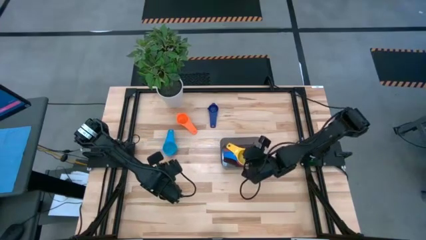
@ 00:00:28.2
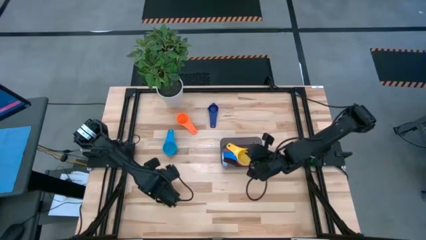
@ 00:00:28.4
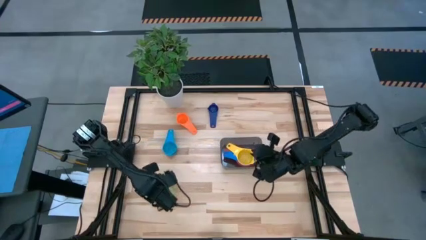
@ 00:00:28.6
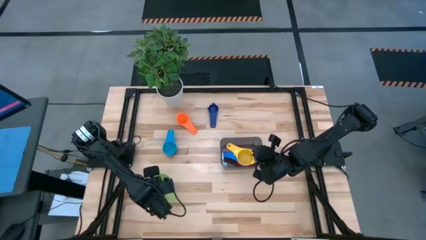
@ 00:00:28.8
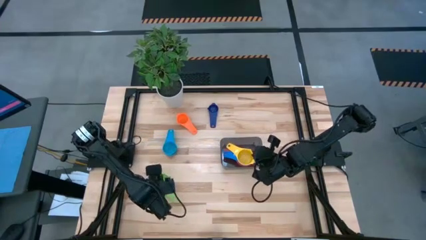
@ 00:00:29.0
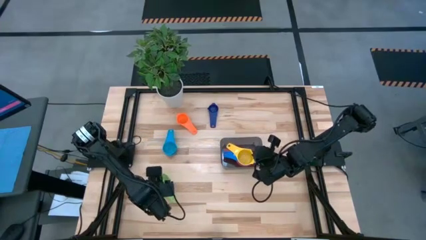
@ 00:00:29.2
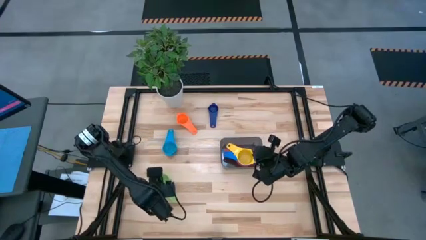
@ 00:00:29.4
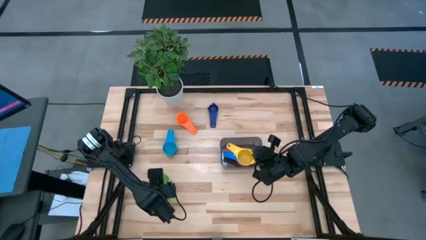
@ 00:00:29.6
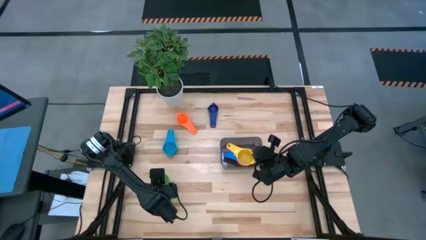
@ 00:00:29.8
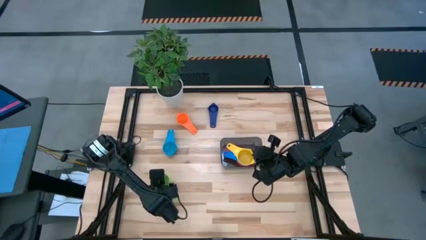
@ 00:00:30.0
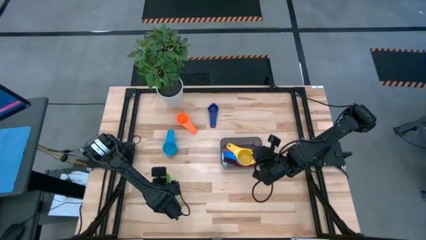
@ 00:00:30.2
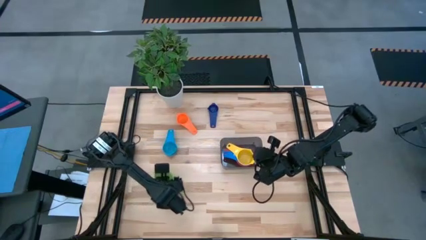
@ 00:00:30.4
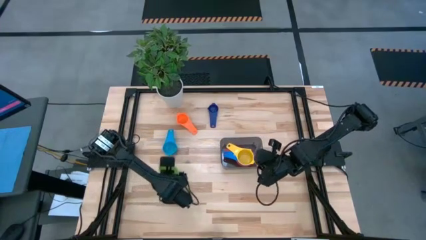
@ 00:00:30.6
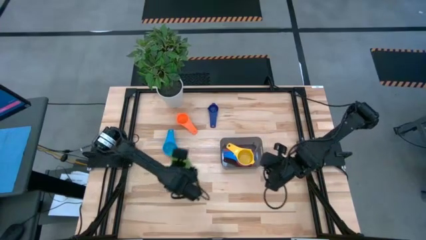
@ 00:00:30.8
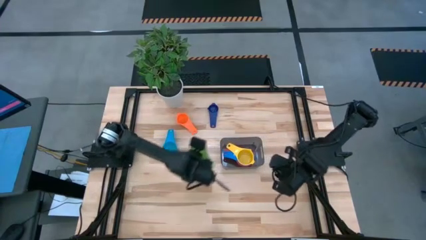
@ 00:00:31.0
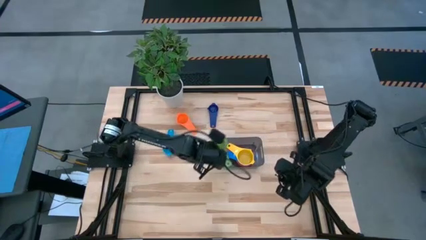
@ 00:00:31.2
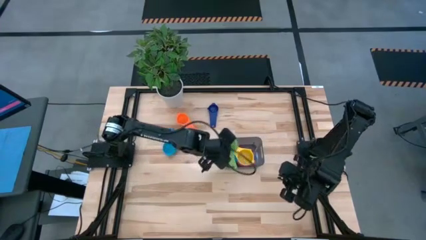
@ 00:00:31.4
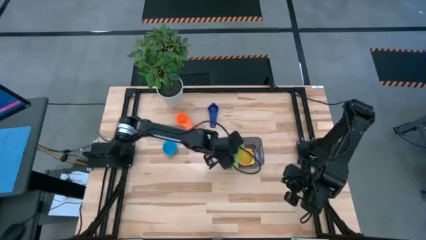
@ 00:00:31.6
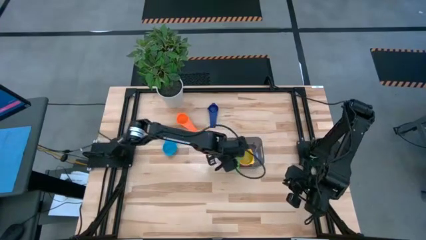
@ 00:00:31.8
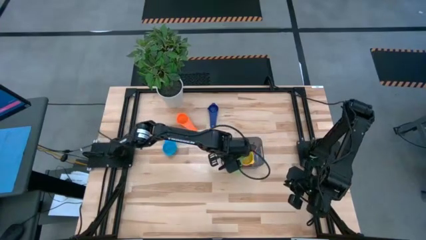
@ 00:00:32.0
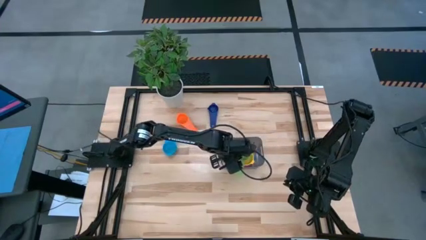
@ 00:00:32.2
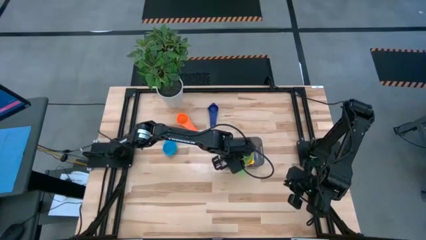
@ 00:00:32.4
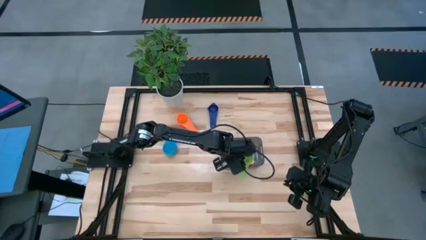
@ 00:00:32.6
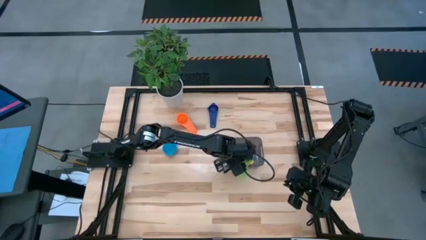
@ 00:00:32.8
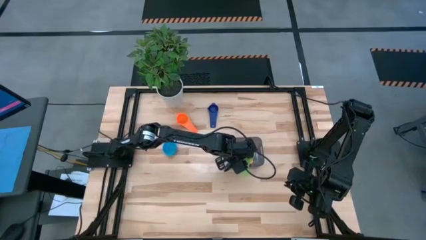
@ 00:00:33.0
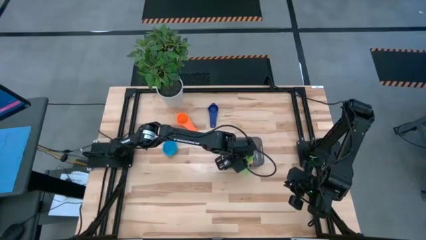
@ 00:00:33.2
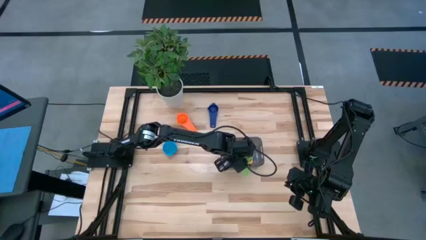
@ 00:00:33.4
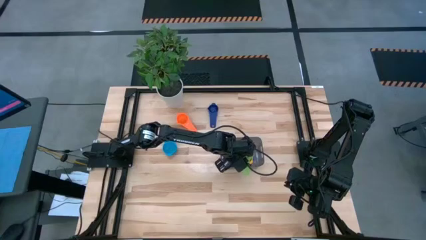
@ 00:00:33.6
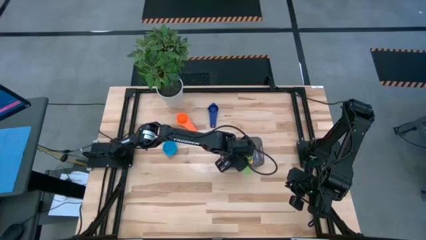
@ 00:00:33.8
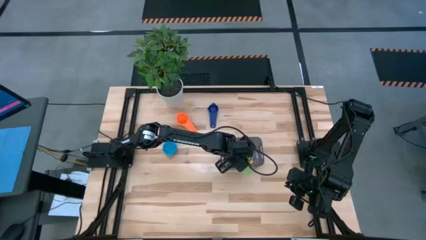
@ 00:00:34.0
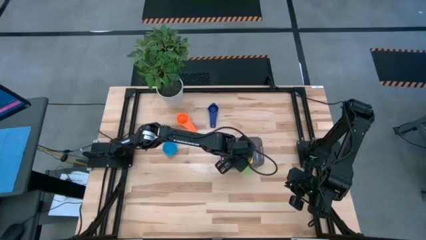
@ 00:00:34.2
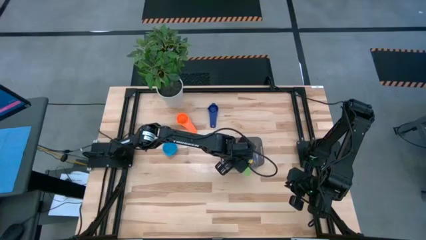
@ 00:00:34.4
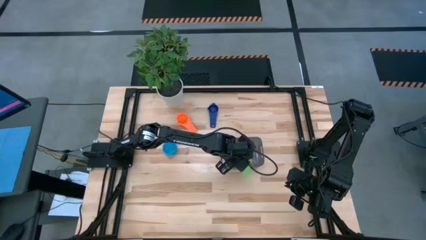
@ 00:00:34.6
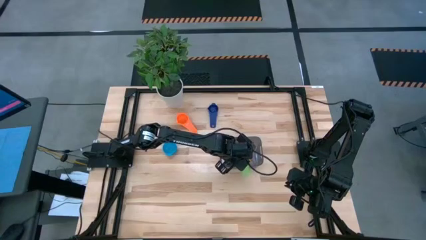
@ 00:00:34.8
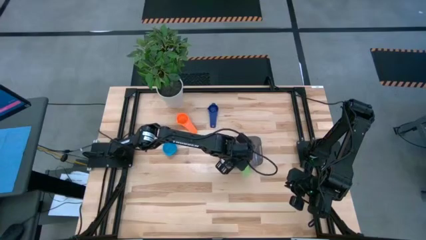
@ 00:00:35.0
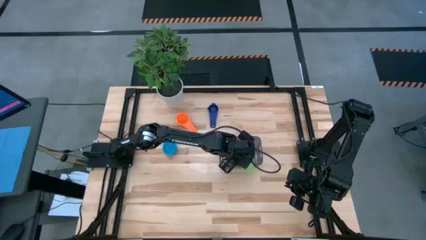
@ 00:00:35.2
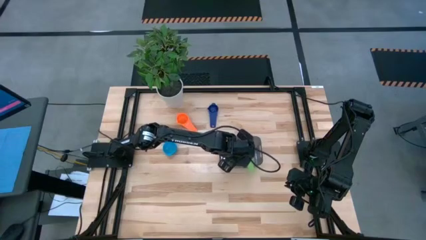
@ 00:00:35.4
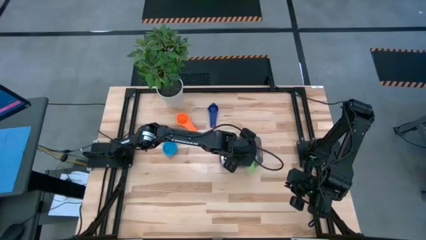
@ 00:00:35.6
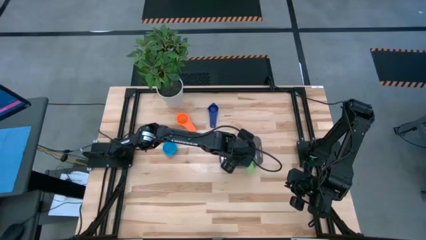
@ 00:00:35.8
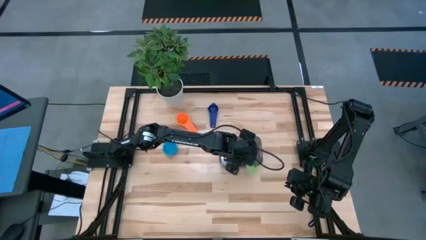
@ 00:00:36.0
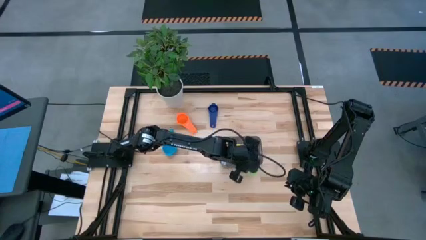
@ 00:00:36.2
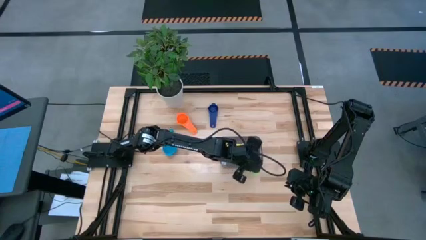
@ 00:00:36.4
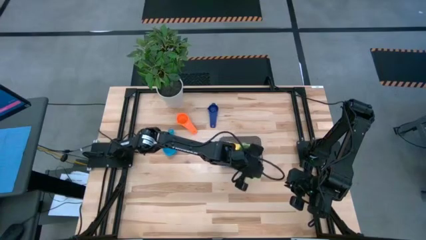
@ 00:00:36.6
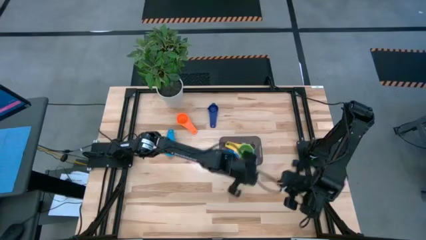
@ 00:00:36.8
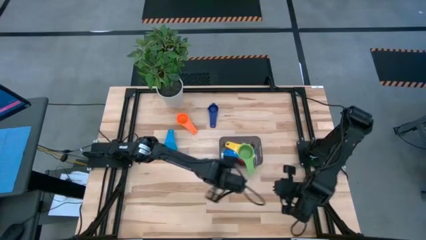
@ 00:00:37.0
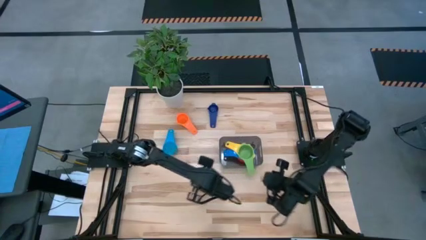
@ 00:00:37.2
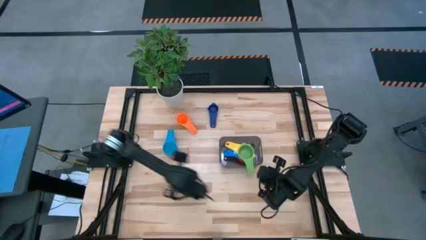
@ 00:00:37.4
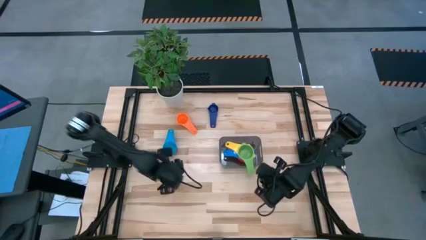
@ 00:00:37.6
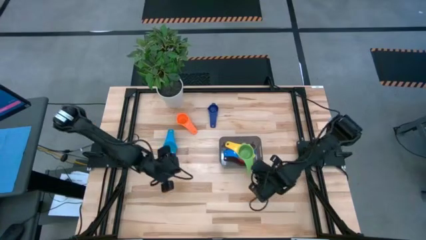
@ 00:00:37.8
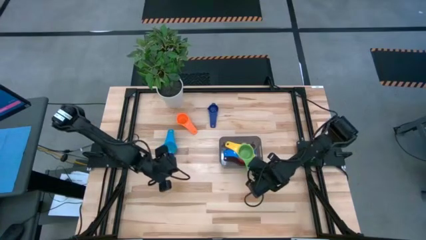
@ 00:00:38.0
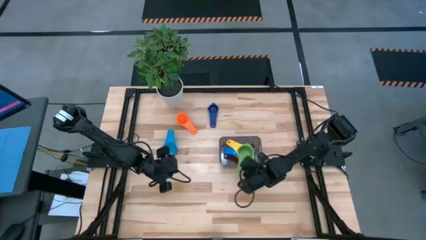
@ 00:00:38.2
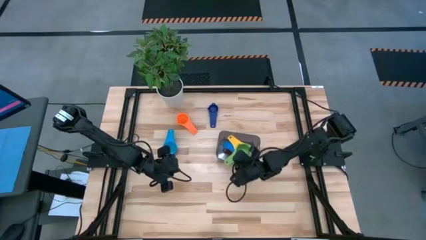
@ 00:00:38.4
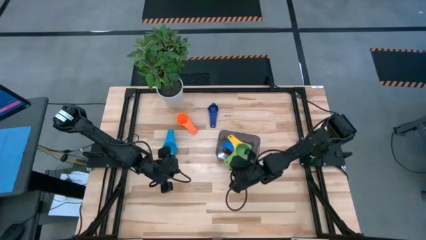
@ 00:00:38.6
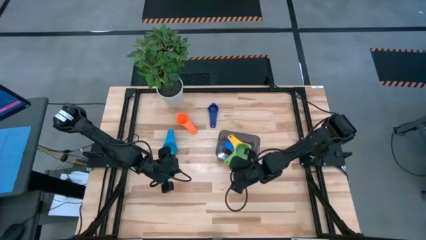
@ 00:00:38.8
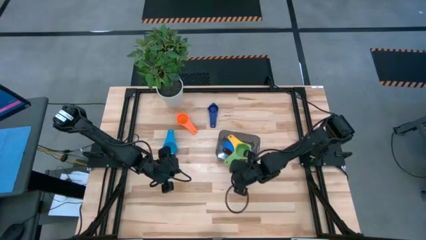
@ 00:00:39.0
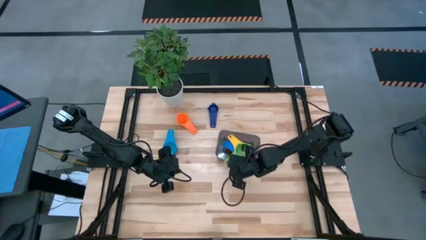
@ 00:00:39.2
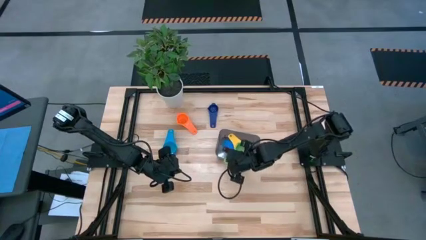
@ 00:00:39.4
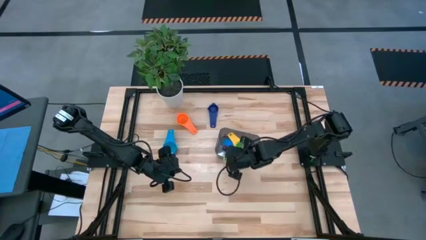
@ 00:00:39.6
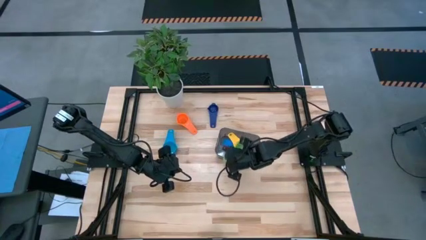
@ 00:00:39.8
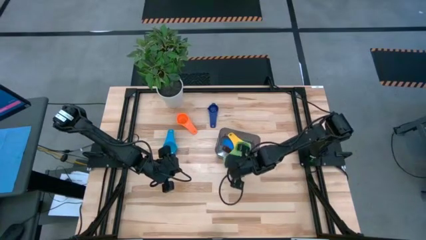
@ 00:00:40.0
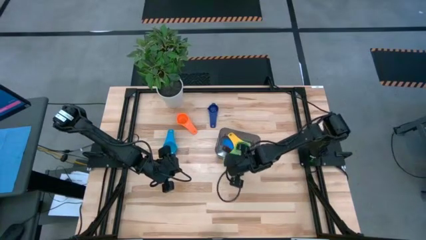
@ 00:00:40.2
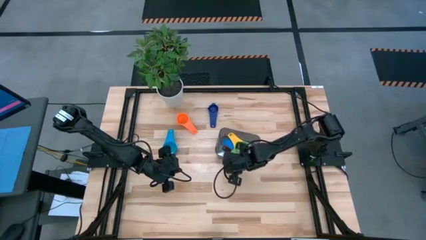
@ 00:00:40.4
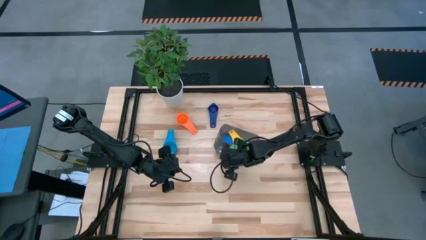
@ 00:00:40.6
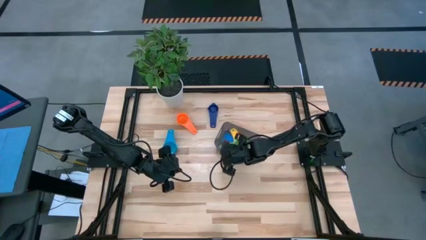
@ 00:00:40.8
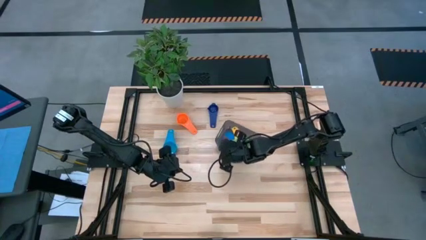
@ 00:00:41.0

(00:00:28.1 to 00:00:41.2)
Task: Nest measuring cups in basket
Stack the green measuring cup on top of the yellow measuring cup in the black bin
